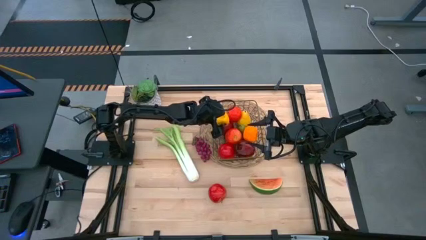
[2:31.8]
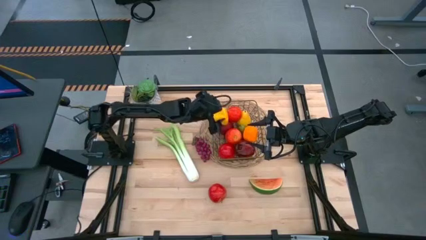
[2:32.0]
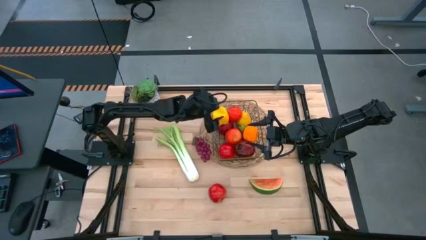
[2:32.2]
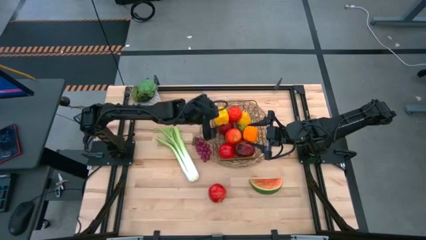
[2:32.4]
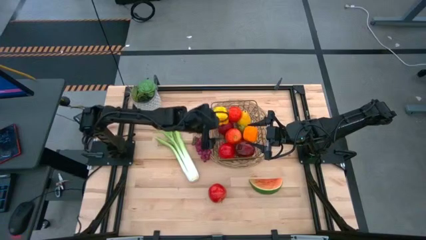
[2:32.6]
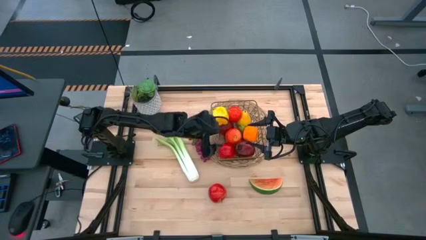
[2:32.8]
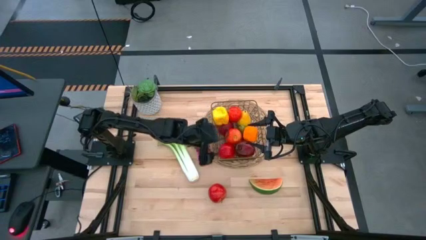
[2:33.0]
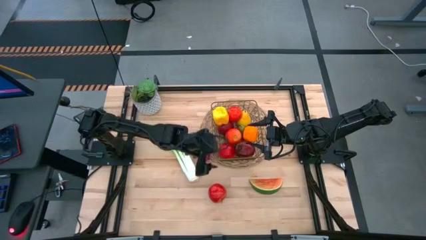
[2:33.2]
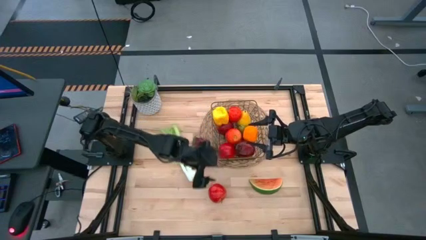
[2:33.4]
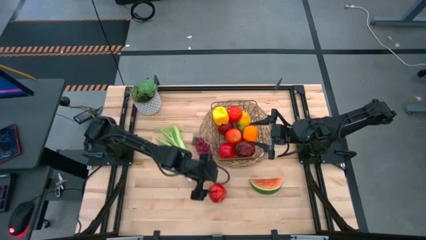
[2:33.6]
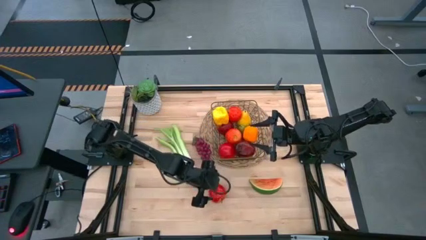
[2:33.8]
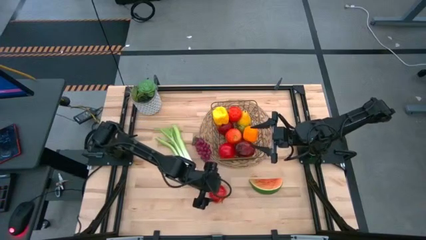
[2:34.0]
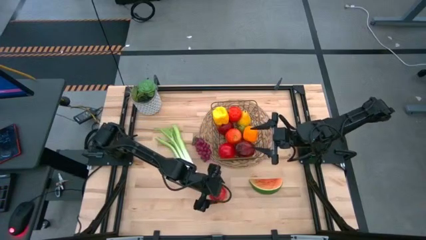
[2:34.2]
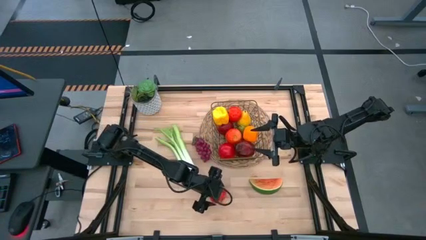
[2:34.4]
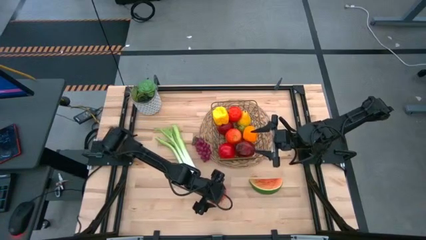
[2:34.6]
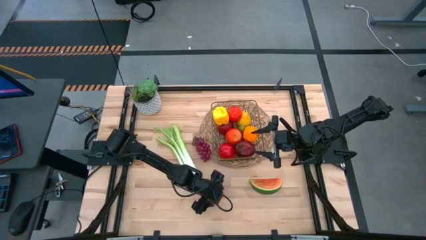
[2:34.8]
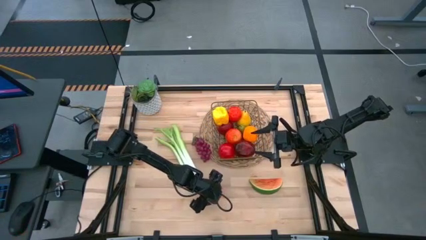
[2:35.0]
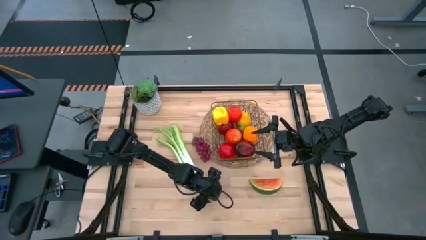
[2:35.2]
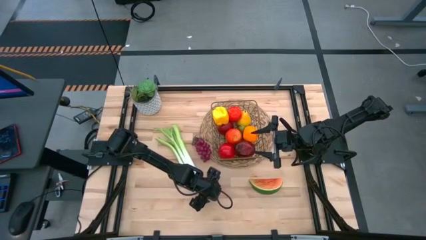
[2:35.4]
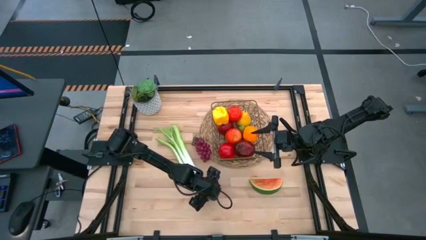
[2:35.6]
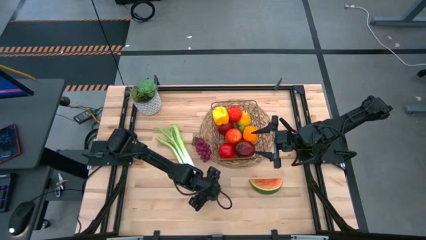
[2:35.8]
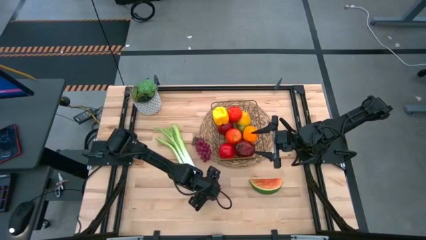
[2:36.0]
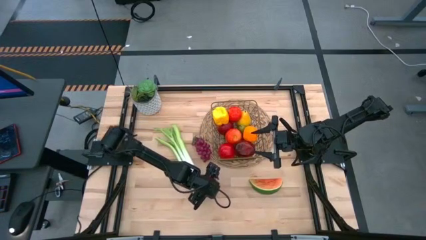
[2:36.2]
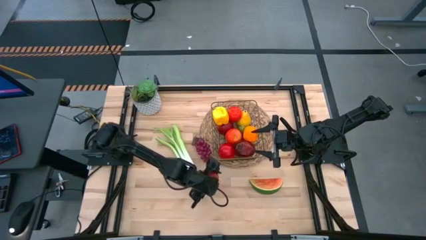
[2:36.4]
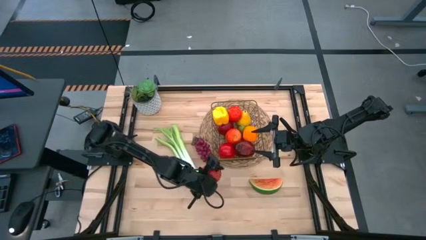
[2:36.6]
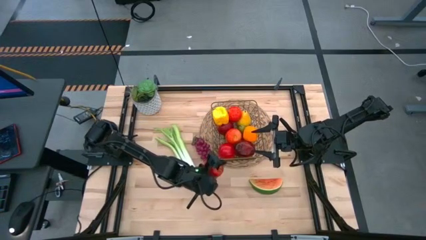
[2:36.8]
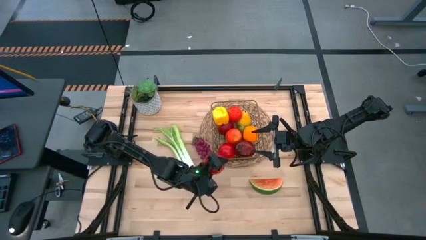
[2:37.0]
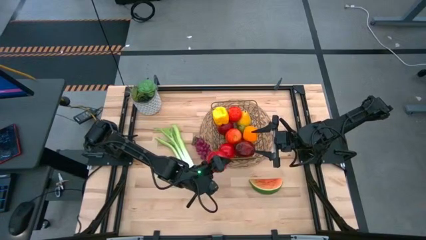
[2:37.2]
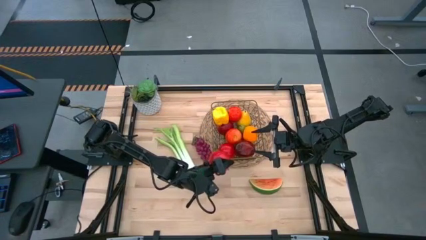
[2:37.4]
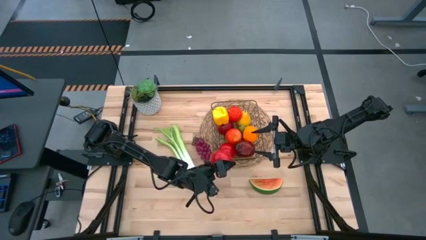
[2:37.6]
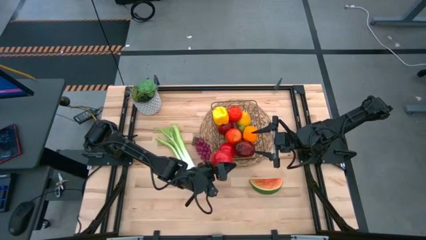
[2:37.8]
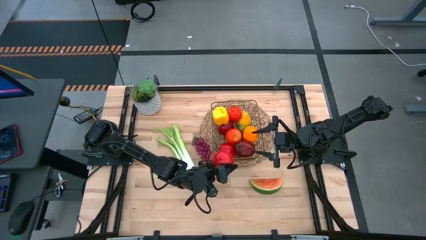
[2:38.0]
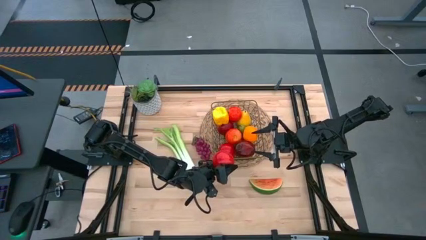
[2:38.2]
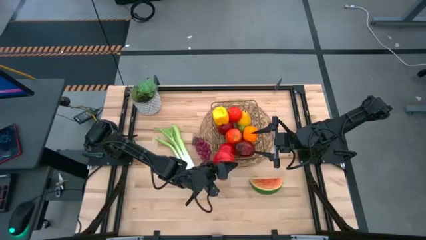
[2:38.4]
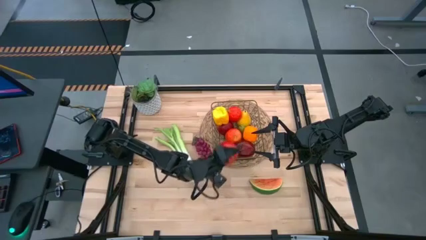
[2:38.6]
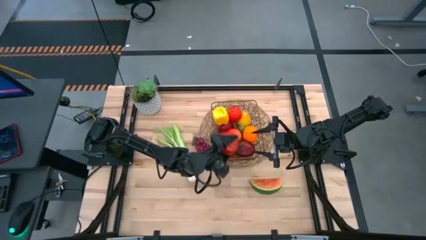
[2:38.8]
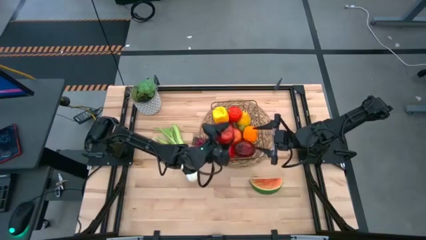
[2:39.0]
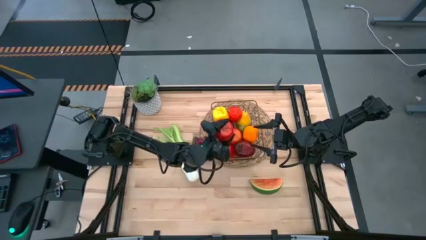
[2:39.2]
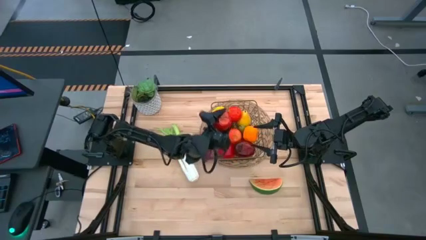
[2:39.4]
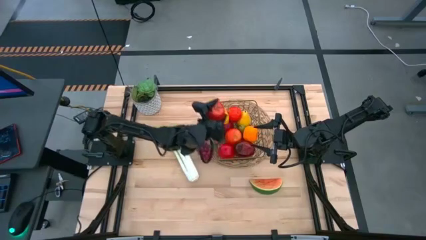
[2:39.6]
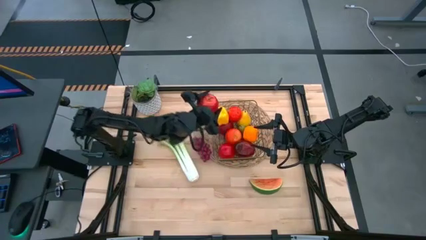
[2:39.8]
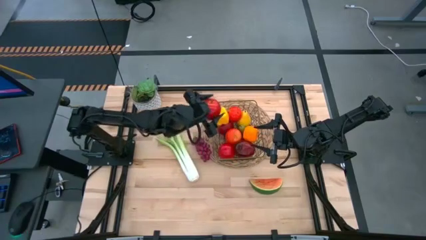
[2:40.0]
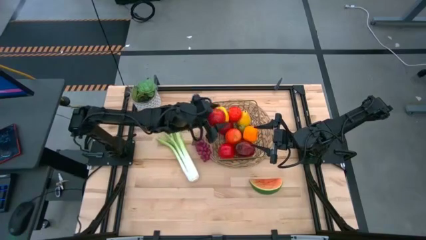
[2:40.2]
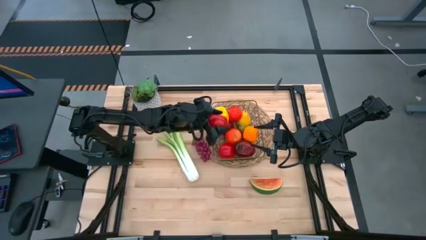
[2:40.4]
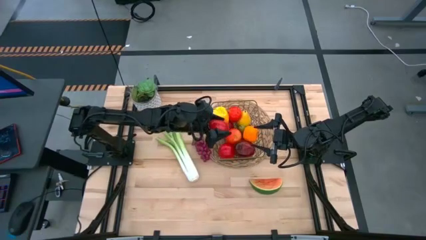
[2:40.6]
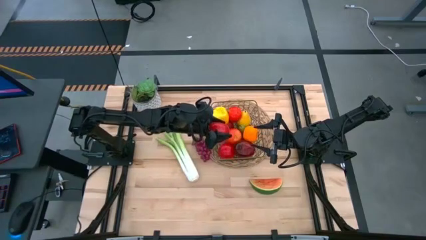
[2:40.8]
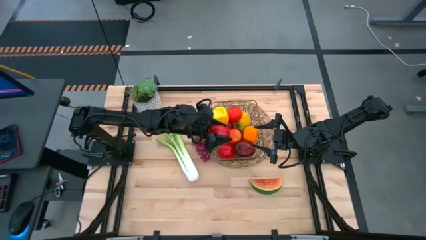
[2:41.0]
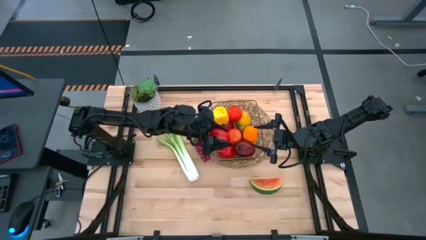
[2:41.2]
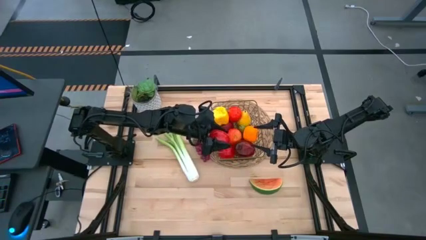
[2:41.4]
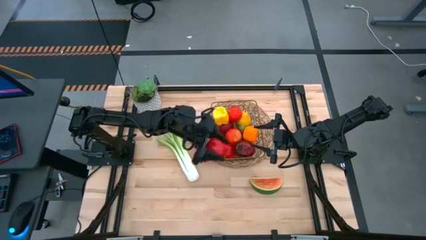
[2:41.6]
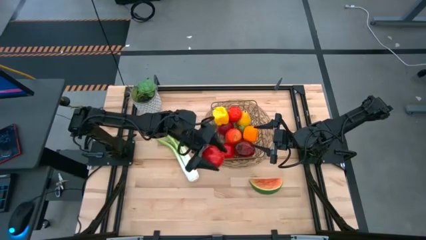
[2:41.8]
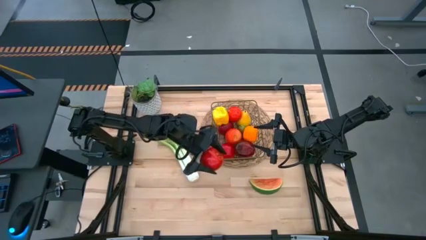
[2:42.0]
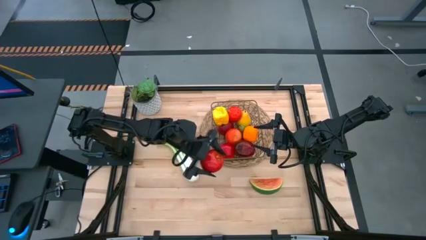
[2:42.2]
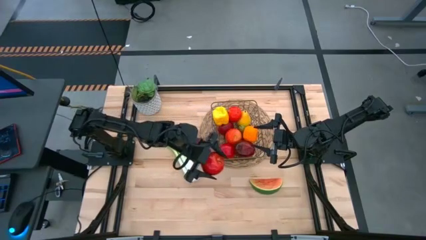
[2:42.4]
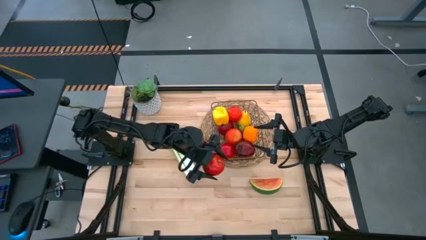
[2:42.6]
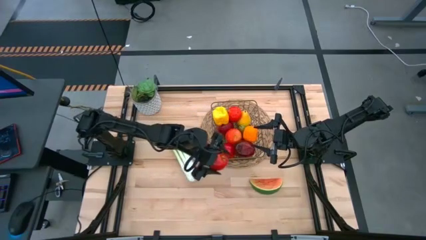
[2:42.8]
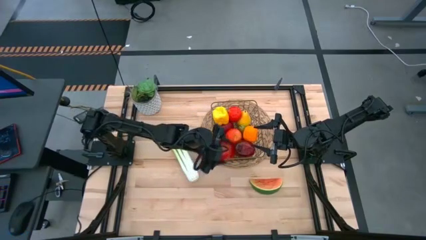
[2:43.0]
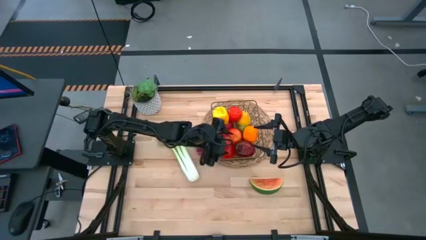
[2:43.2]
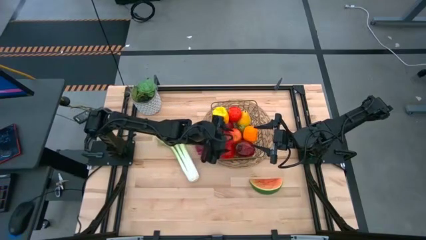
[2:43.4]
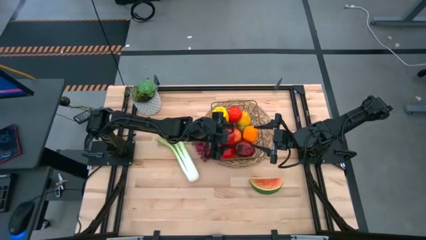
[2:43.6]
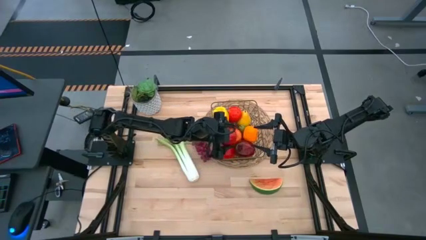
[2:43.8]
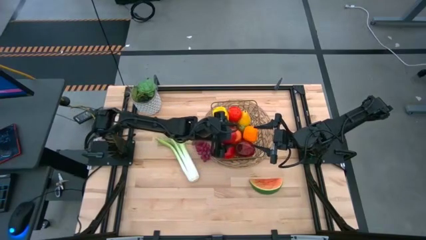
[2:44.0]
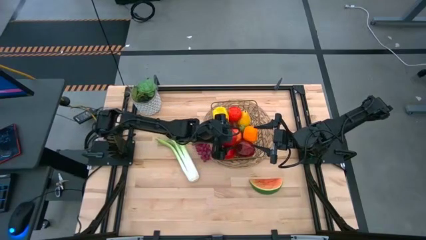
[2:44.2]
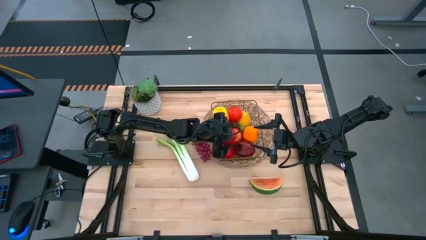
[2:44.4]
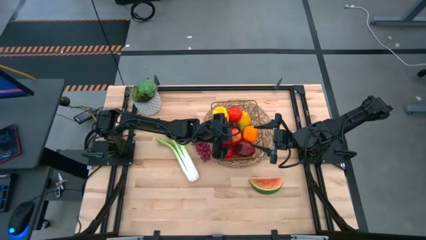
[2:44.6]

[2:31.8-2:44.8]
Task: Build produce basket
Put the apple into the wire basket

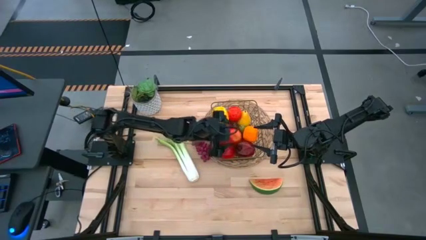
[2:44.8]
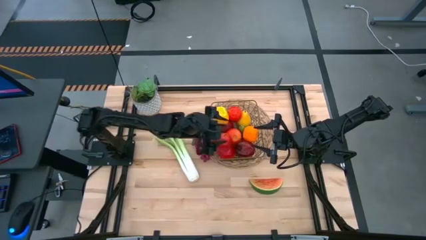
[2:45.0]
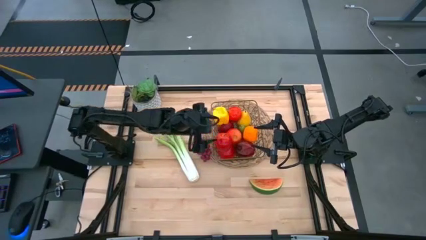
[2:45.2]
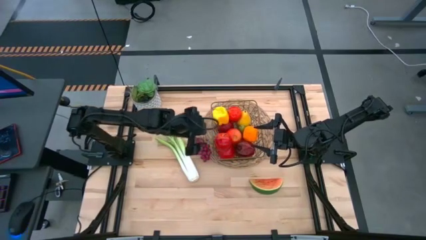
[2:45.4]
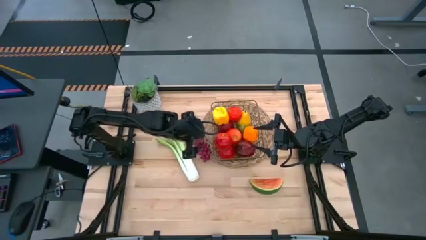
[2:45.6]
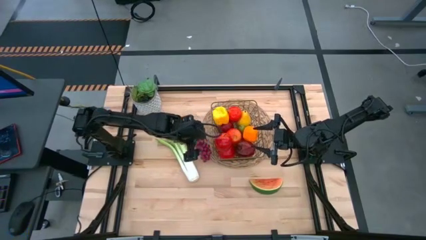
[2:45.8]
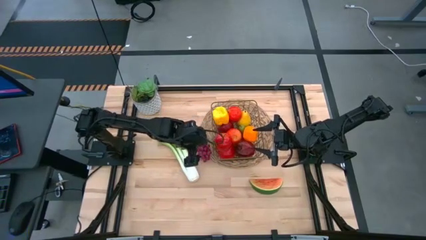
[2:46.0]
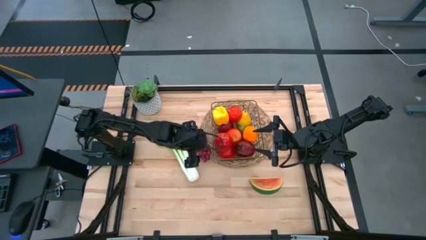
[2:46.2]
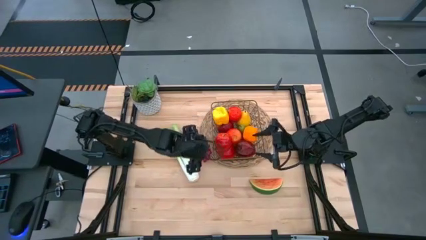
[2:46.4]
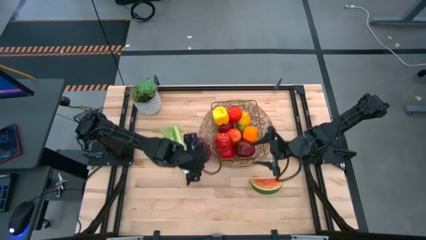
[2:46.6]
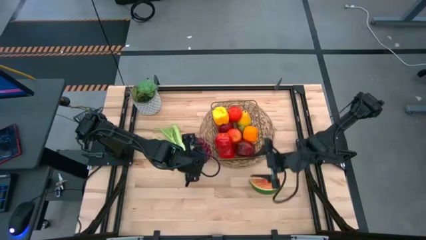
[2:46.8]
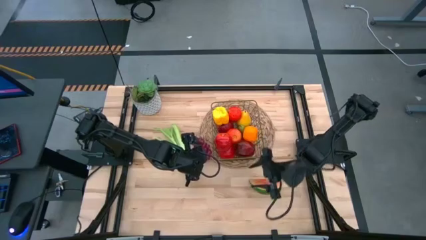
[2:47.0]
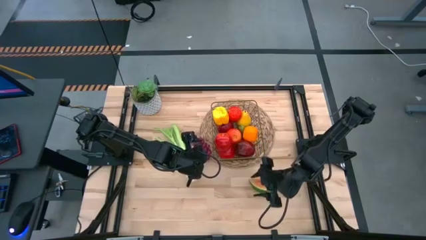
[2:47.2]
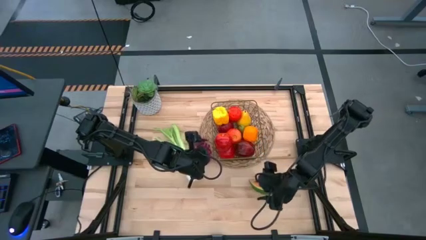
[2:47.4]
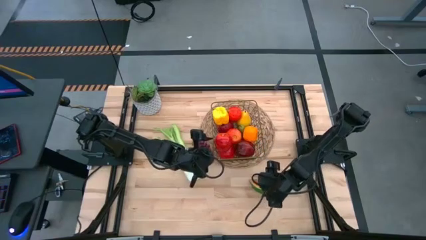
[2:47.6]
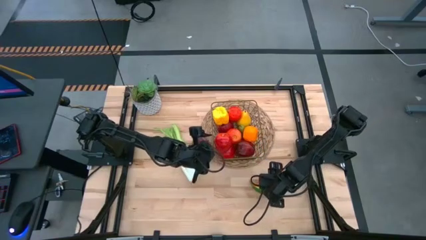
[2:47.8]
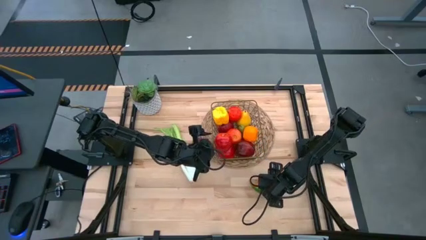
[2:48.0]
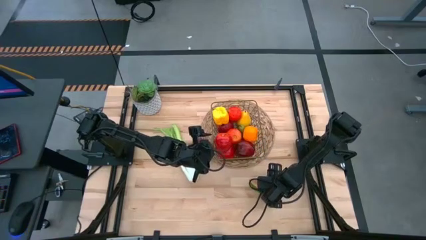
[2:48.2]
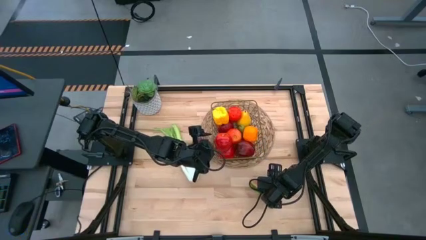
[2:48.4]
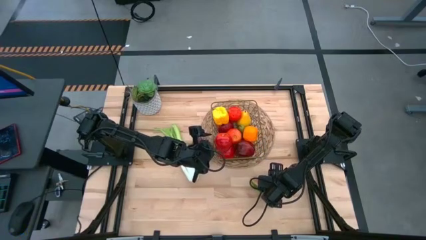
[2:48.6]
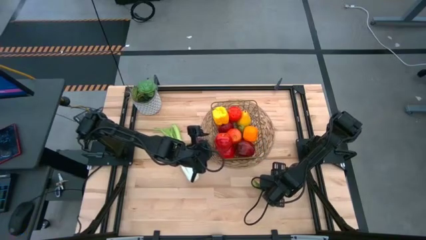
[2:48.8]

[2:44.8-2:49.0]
Put the watermelon into the wire basket
